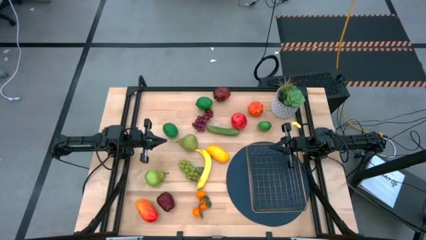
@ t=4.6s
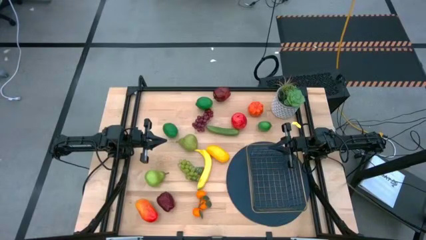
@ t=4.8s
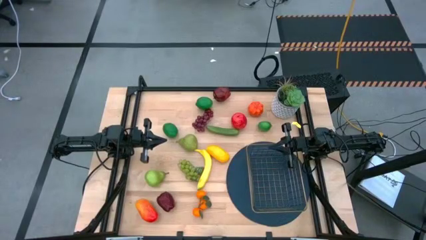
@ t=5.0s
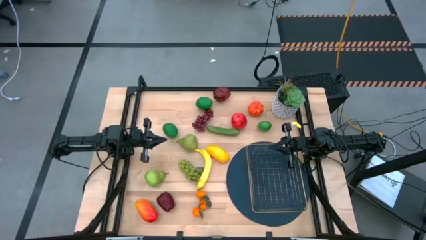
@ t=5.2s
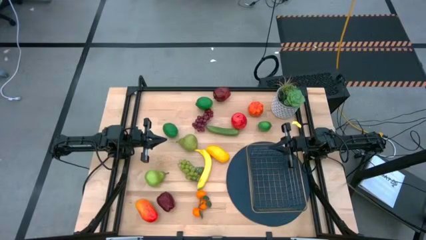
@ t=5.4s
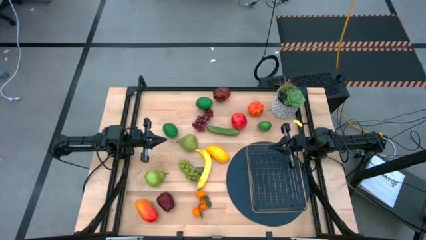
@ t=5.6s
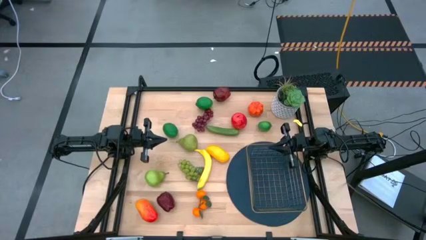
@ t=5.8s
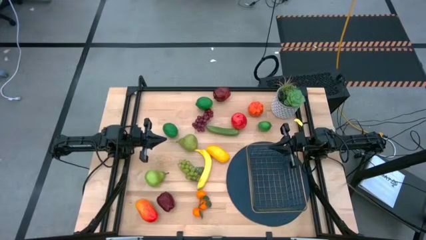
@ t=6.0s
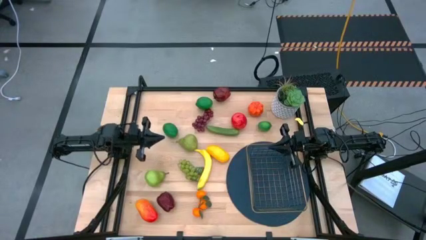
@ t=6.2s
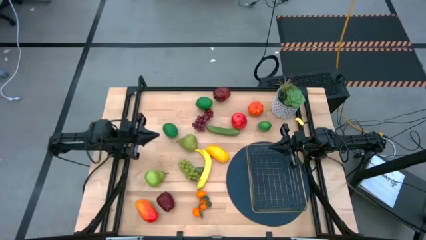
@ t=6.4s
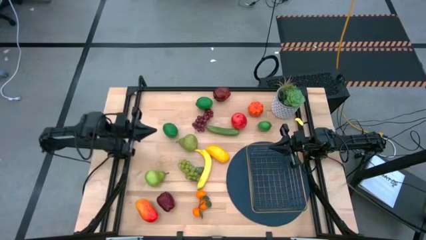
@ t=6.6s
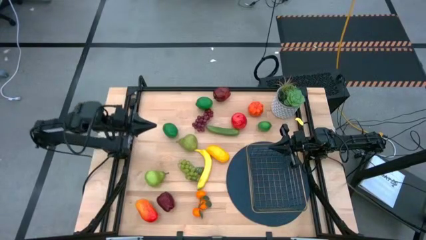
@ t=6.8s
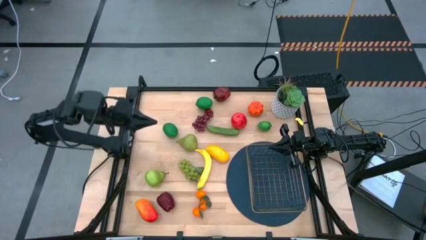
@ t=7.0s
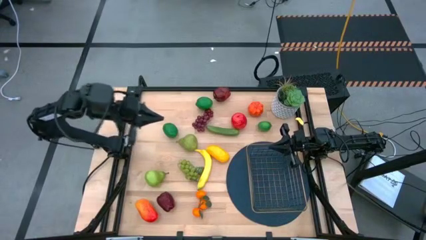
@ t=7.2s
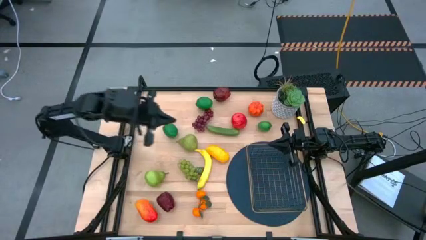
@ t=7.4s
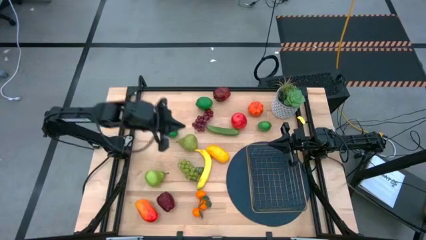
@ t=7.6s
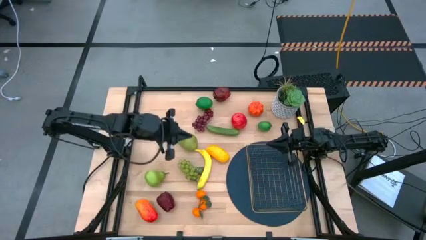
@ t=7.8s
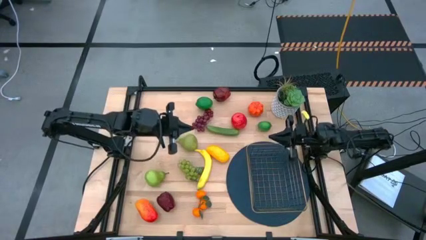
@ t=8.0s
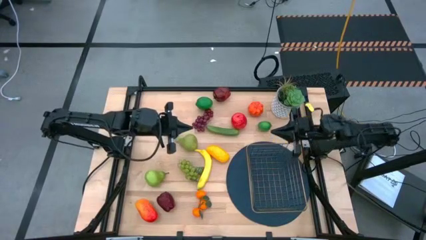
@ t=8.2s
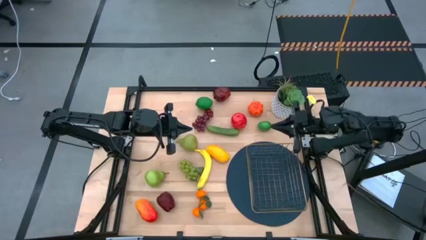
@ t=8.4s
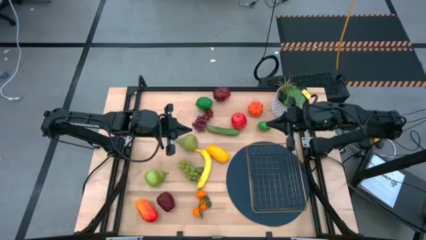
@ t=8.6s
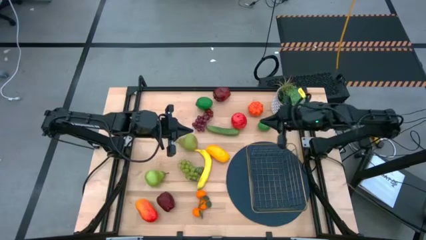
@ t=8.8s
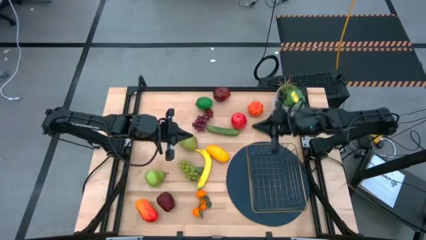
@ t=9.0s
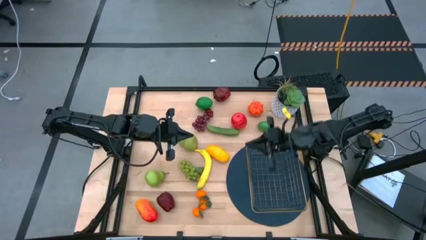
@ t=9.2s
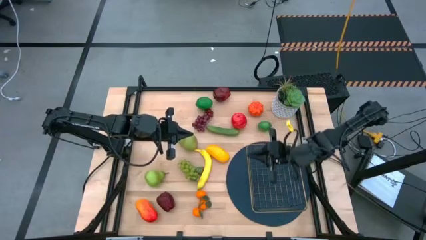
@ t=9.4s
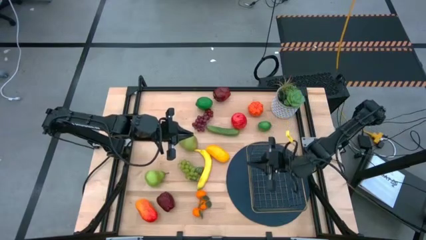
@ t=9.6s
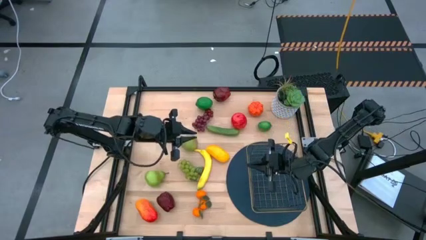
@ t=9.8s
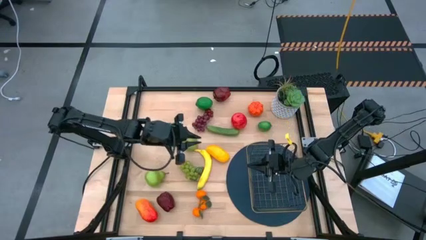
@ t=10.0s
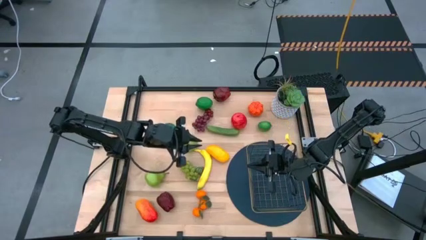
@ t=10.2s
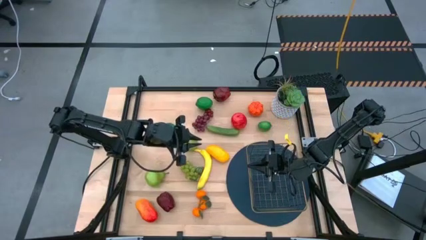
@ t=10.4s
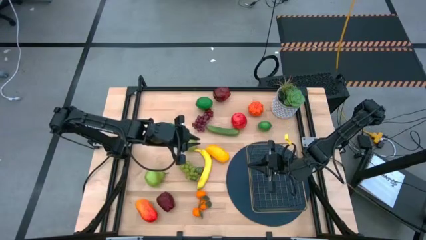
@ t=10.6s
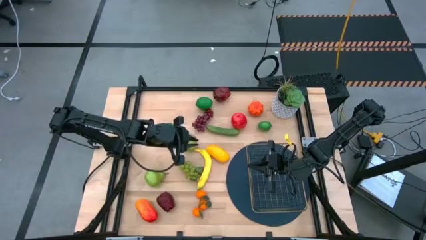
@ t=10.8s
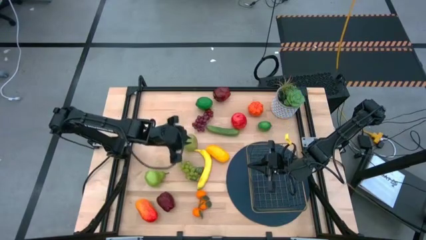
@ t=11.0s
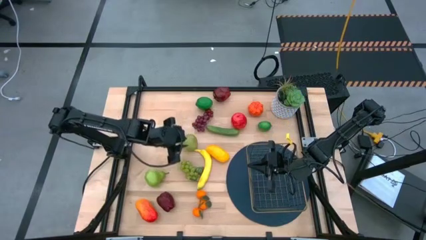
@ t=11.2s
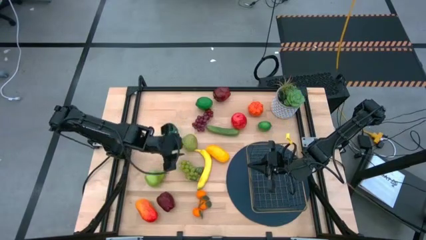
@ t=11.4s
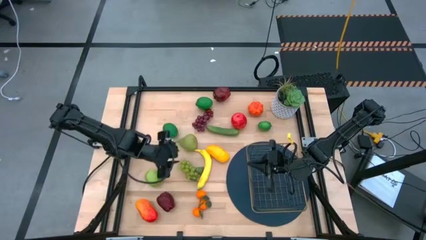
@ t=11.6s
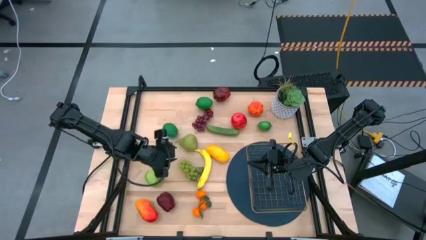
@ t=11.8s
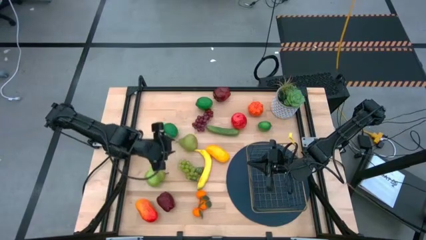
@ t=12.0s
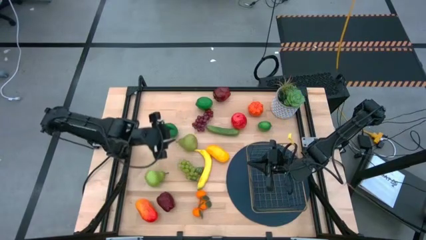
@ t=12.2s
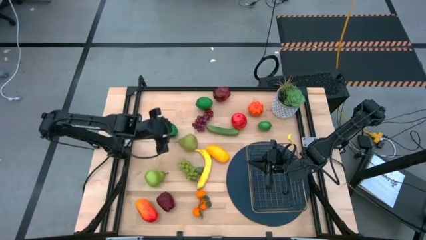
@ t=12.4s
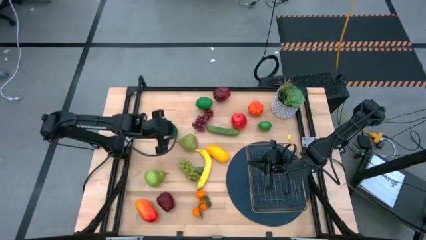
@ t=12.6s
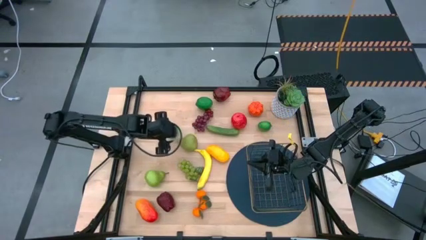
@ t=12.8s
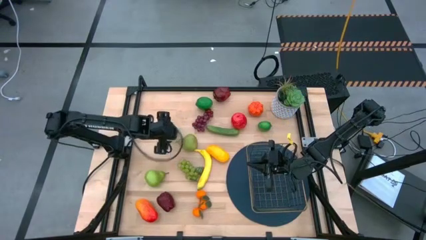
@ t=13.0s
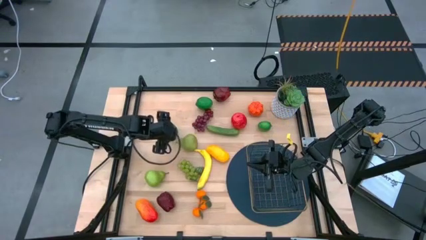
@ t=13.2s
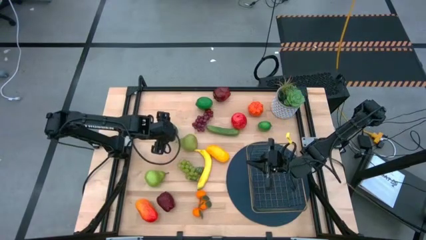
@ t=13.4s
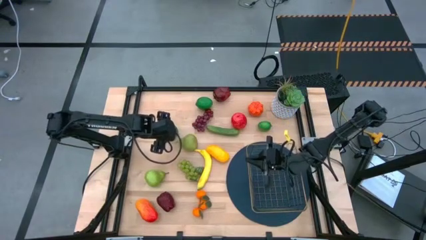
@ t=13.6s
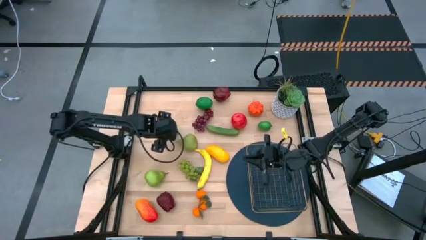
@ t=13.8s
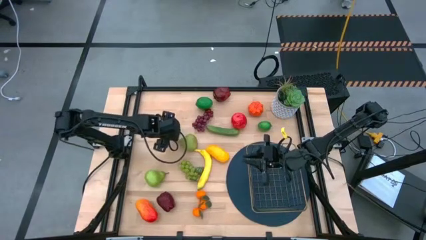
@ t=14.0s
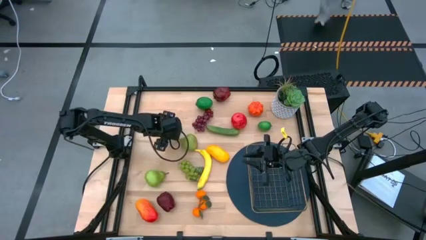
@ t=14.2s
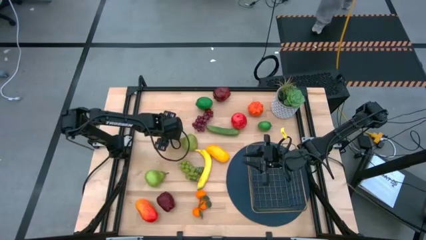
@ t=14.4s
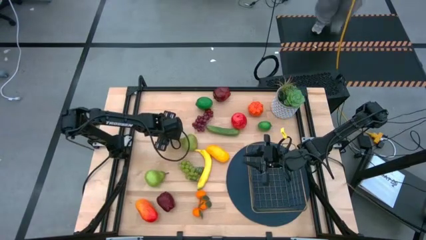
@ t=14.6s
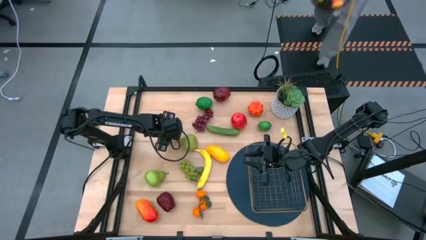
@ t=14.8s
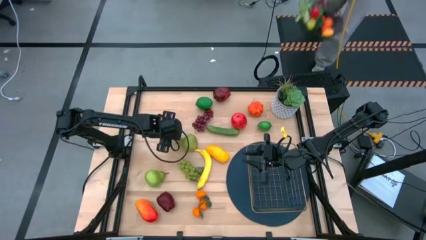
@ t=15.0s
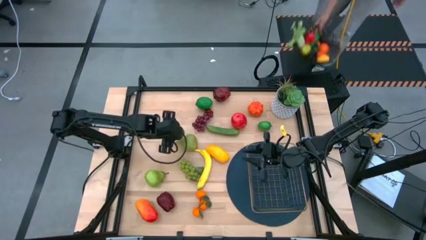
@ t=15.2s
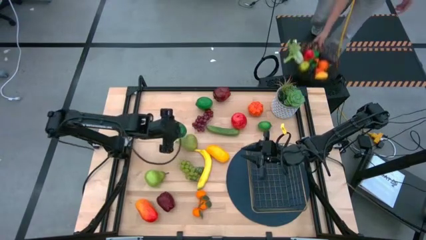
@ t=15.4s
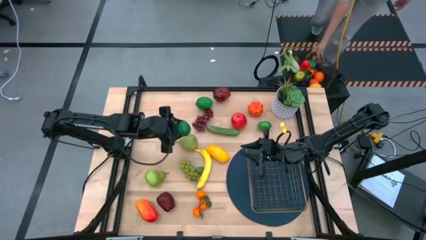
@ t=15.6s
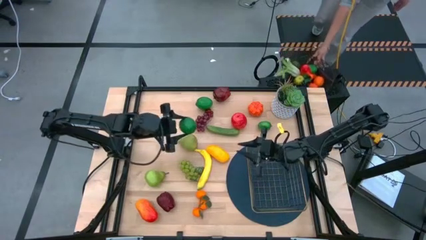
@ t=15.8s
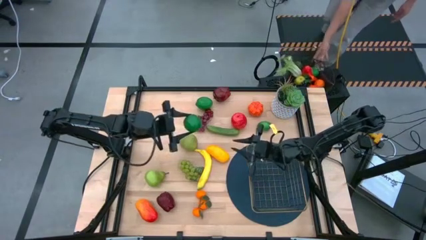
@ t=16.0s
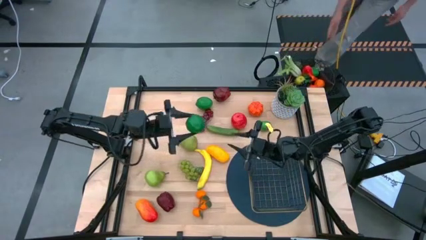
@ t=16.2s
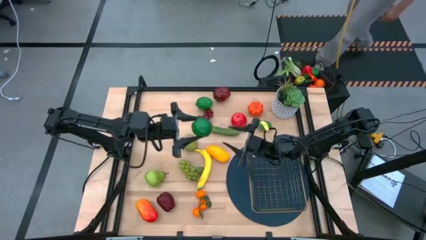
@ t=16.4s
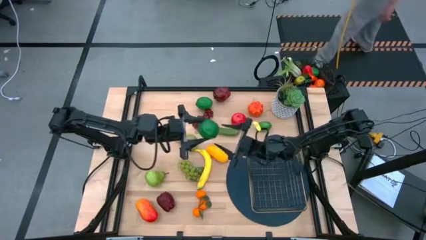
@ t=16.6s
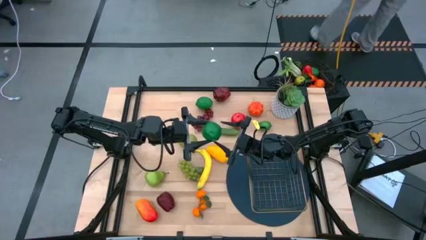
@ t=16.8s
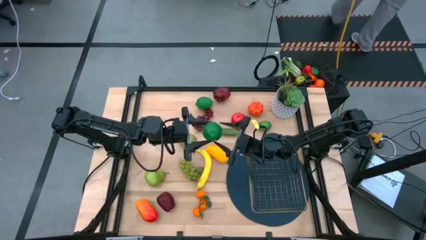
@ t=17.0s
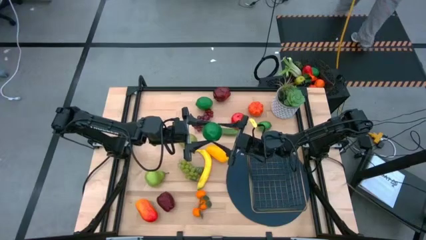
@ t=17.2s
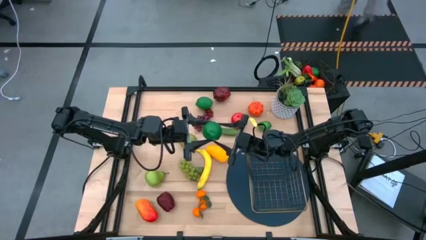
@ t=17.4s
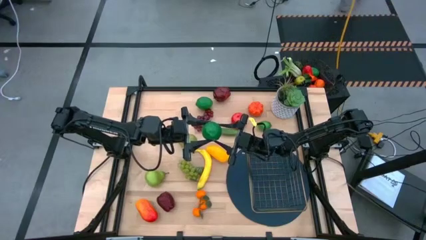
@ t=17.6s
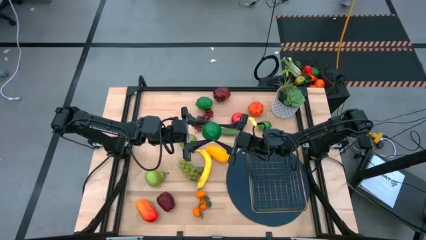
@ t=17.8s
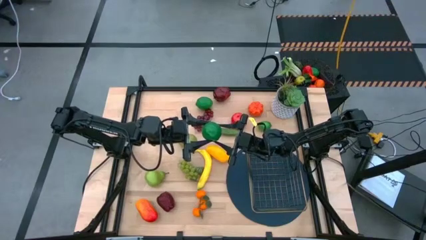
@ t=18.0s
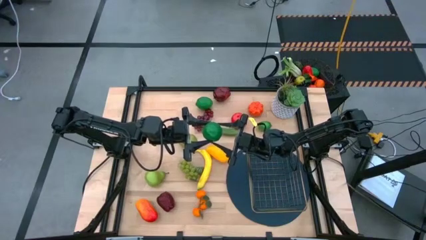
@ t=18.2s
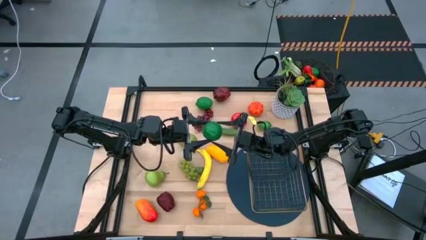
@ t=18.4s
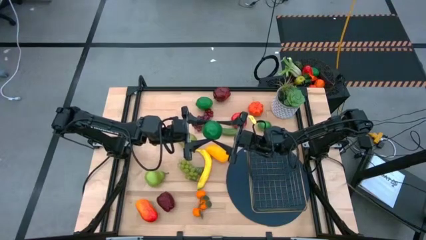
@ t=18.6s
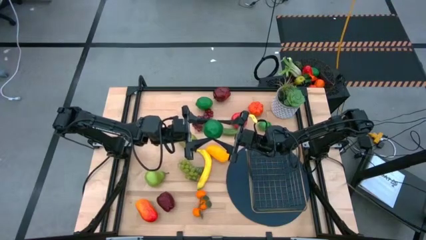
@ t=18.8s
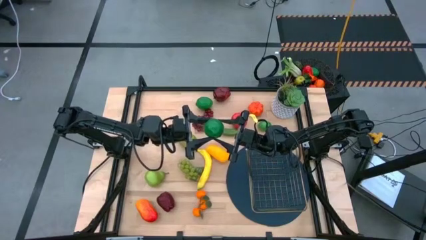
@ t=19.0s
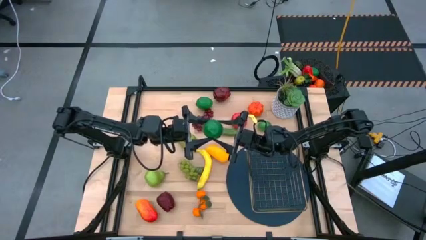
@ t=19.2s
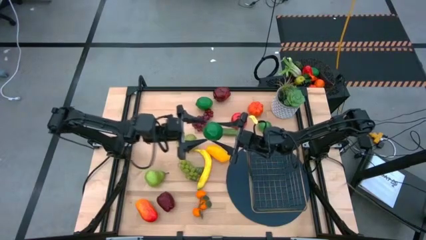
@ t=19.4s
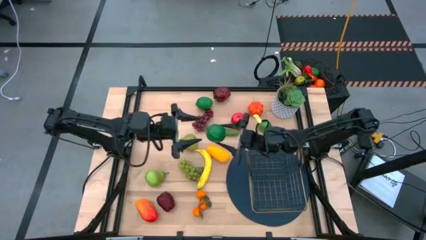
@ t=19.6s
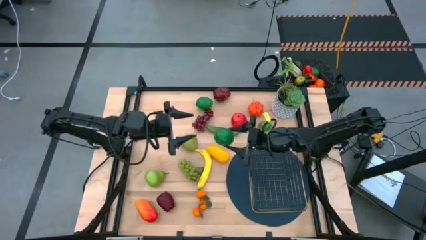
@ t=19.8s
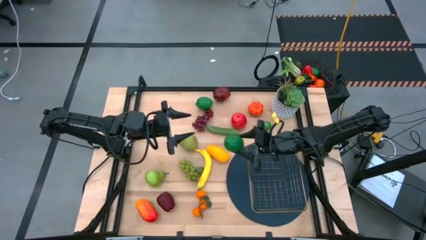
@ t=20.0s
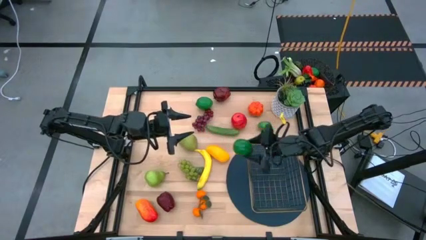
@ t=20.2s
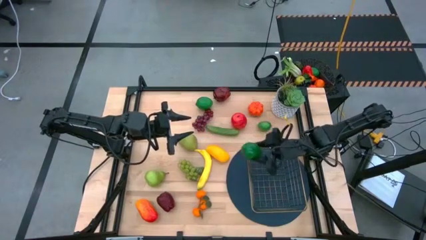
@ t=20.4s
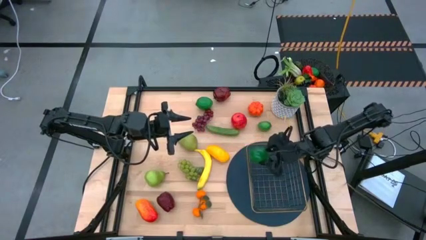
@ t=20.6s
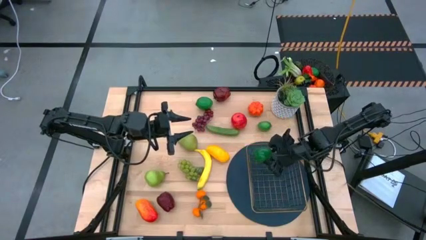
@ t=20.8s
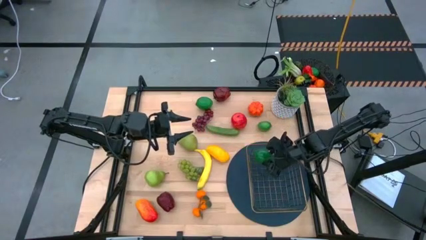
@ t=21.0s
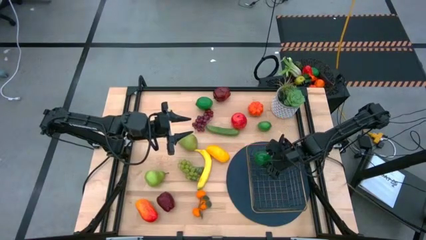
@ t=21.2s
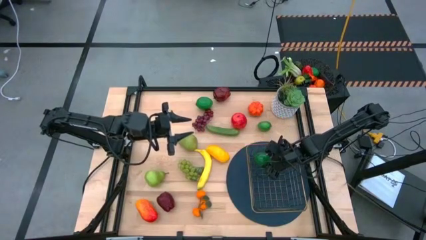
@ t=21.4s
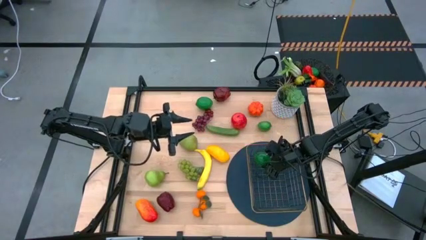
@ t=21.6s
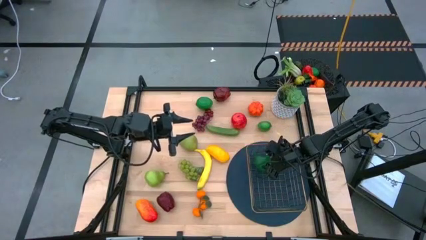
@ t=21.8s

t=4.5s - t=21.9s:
Task: Build produce basket
Put the bottom left lime into the wire basket
